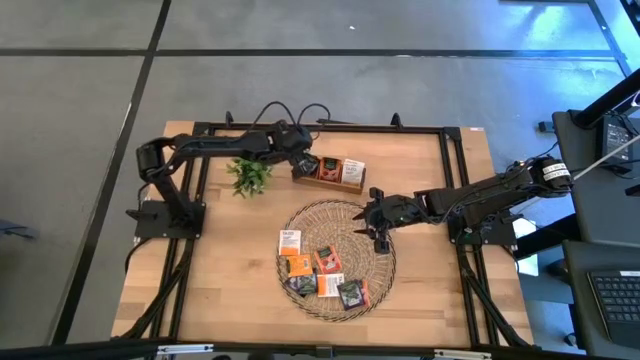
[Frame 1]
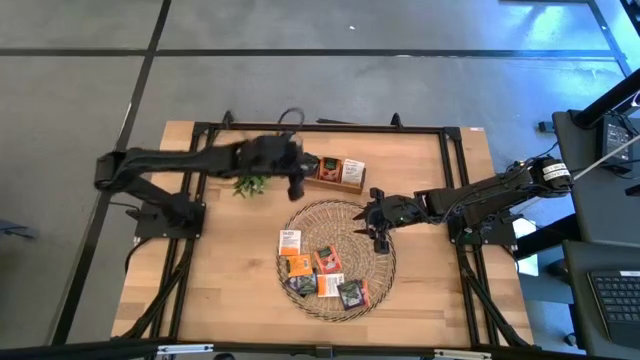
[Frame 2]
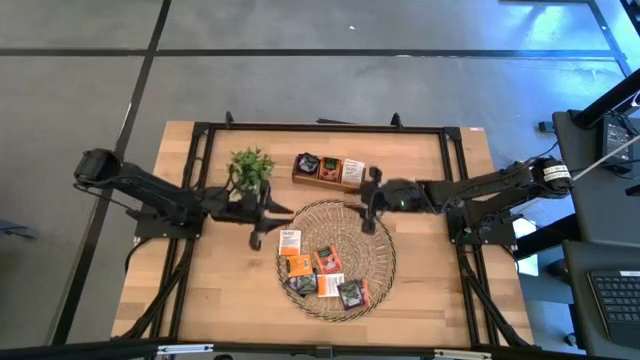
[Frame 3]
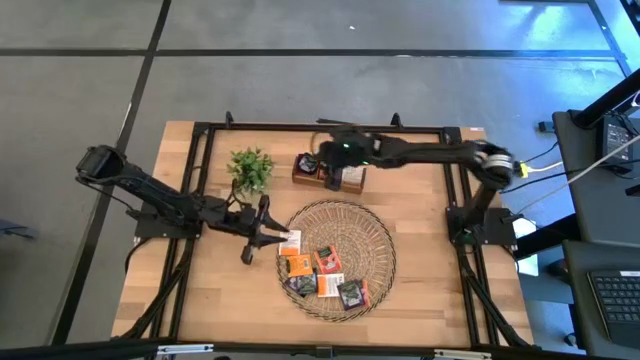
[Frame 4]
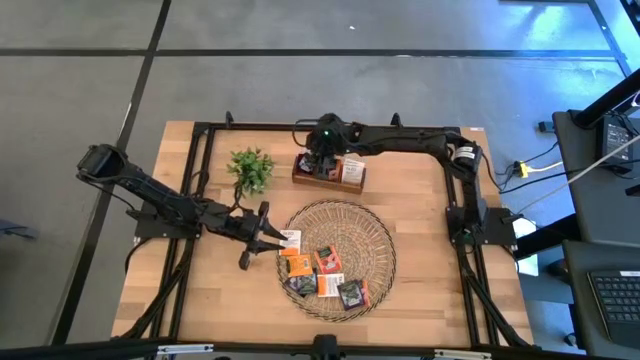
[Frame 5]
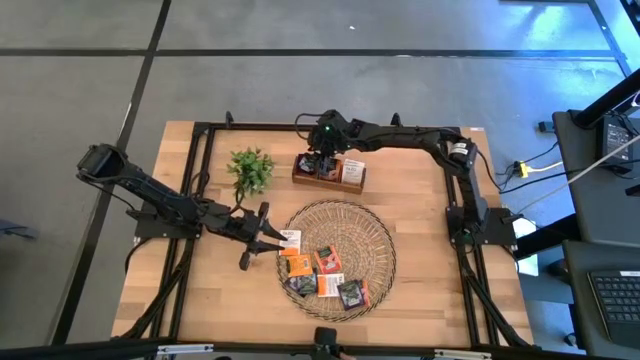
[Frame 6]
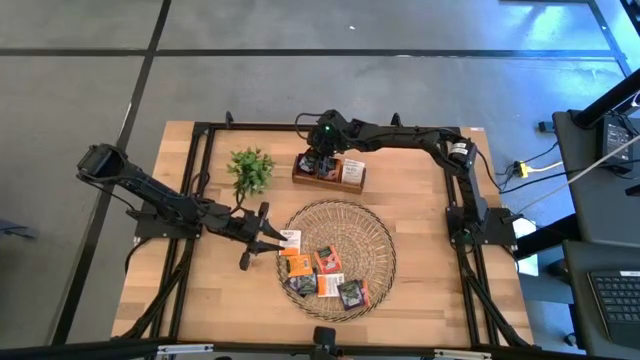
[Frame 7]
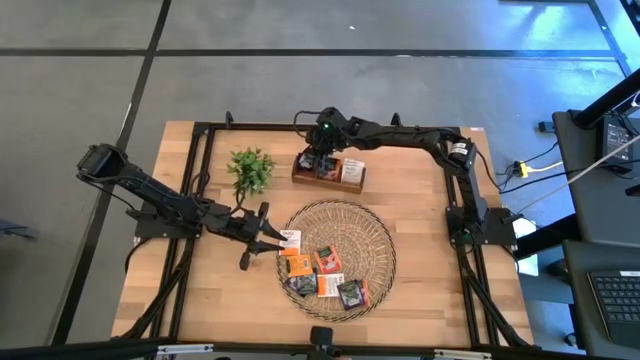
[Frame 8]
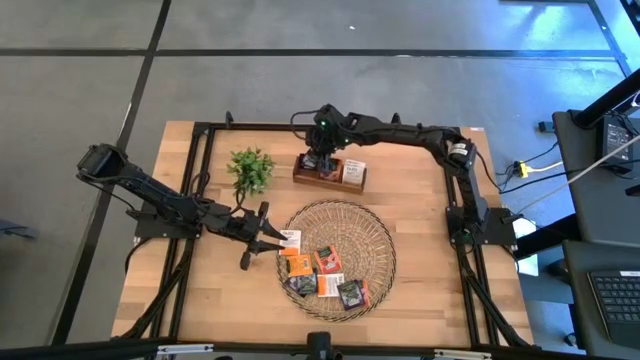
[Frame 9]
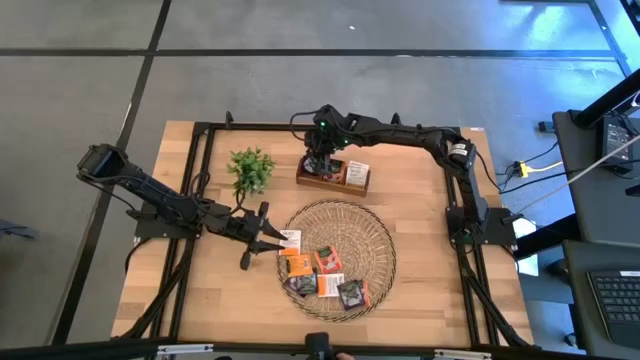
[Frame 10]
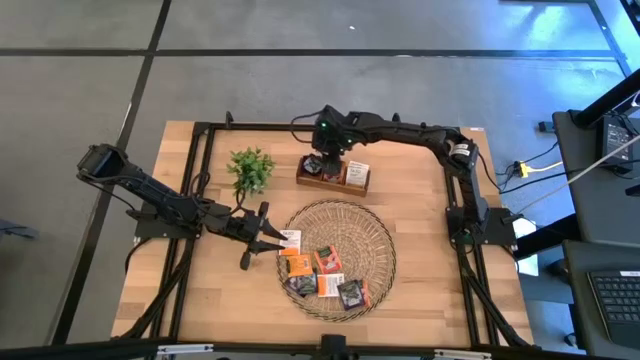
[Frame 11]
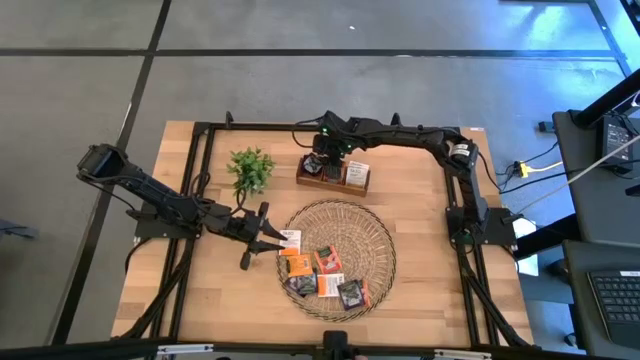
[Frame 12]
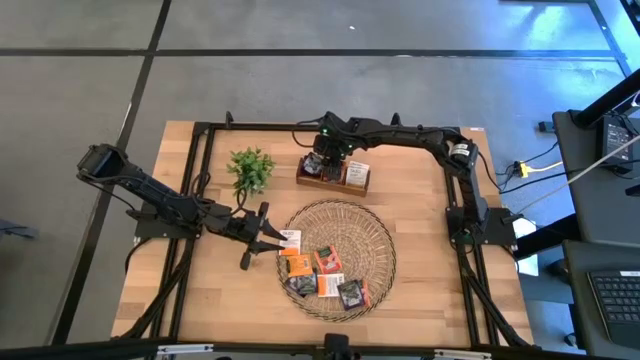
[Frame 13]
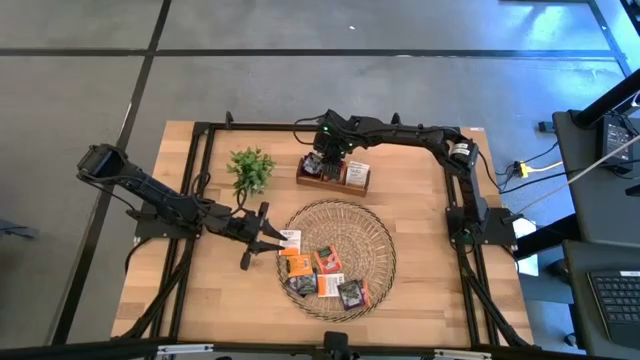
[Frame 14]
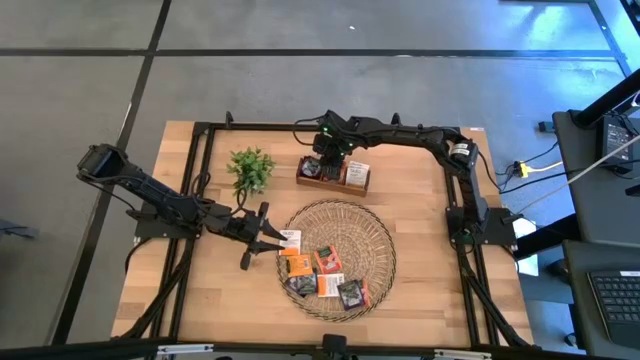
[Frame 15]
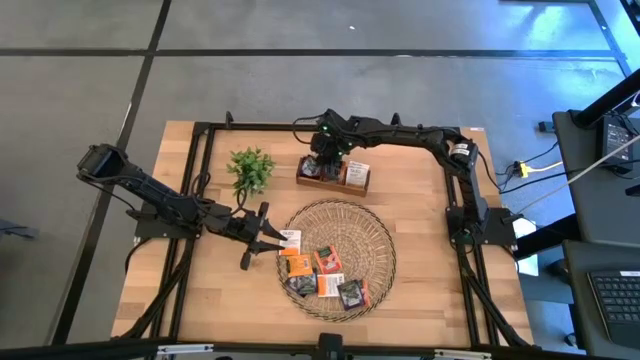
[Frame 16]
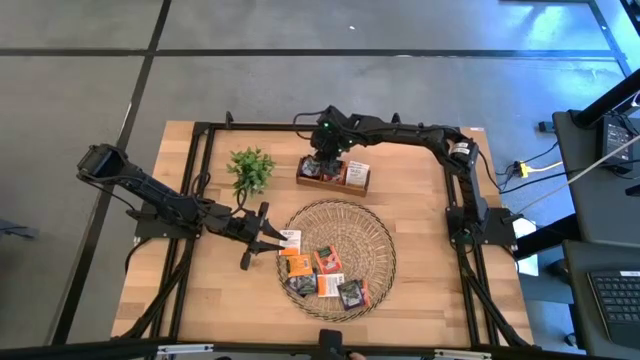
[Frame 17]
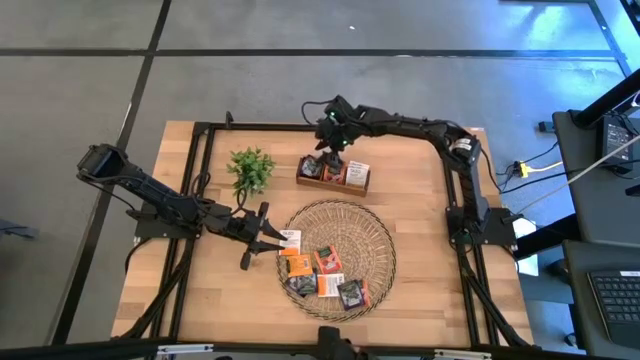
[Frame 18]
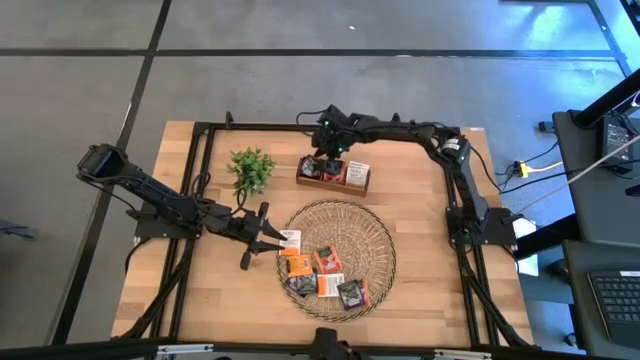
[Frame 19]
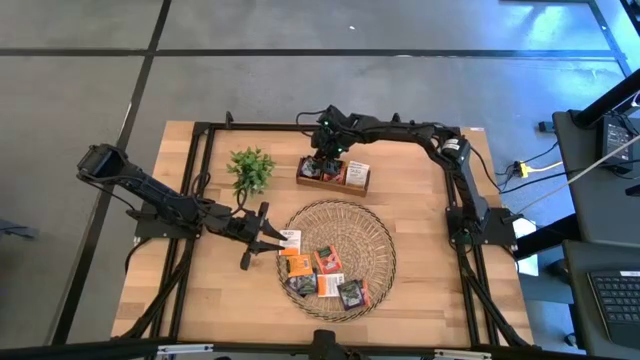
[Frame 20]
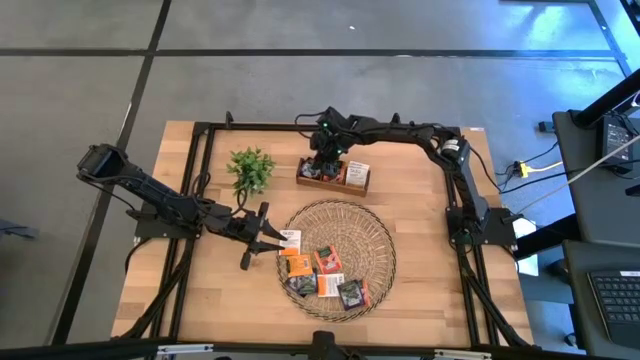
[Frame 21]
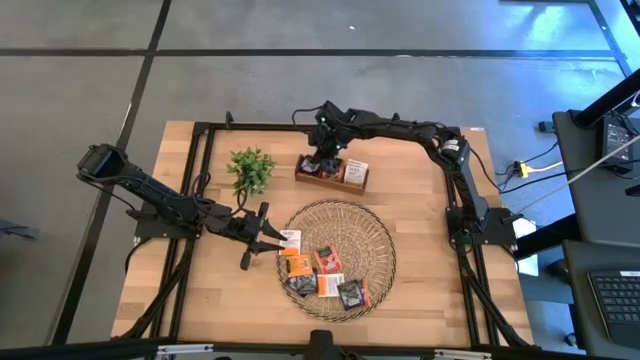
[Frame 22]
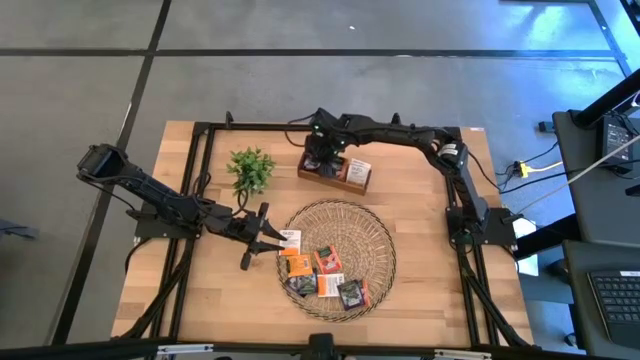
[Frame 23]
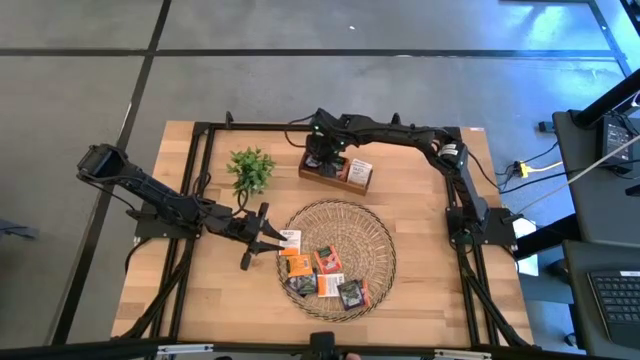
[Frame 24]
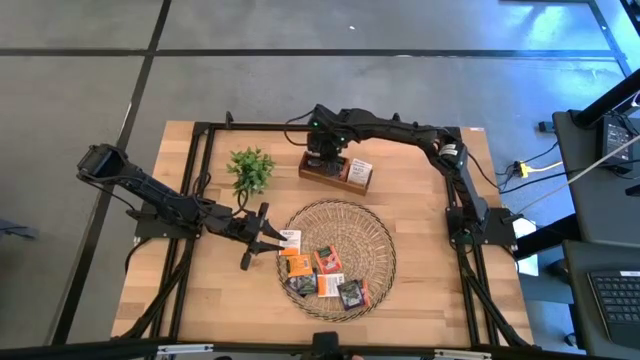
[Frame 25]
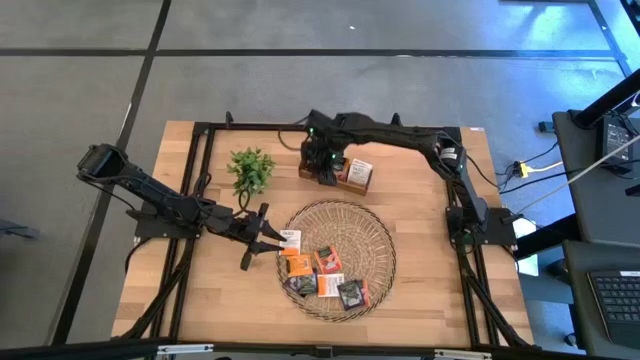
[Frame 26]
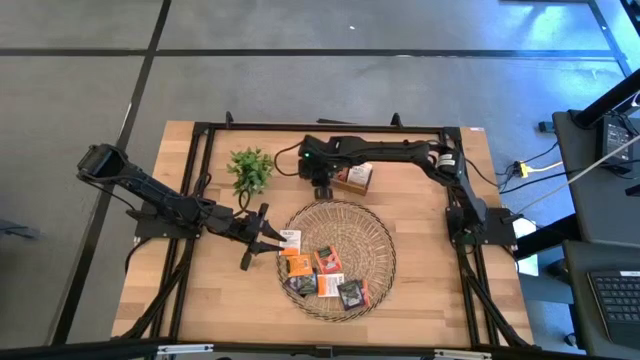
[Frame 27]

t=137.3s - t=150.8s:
Task: Pick & Place Tea
Put the black and white tea bag into the left section of the wooden organizer

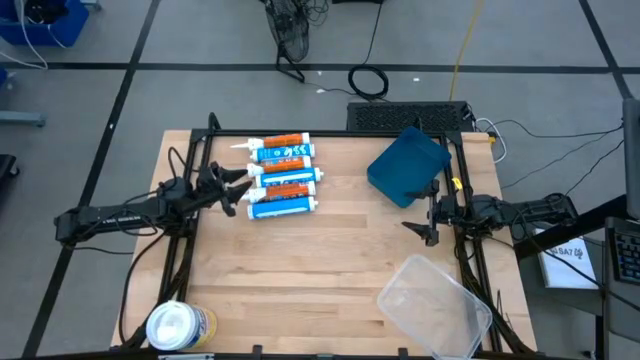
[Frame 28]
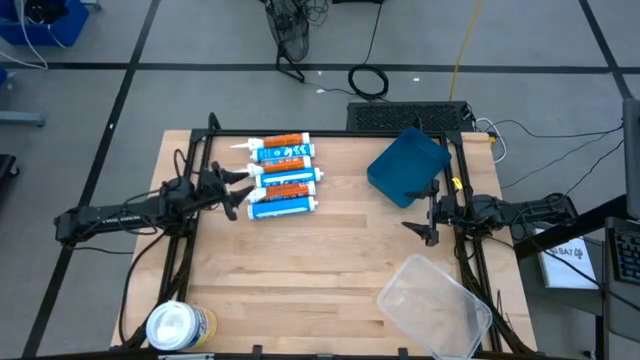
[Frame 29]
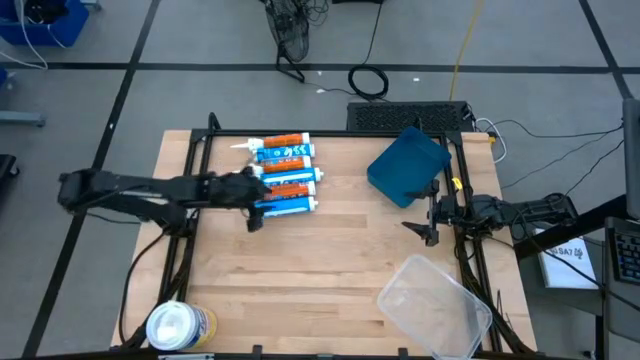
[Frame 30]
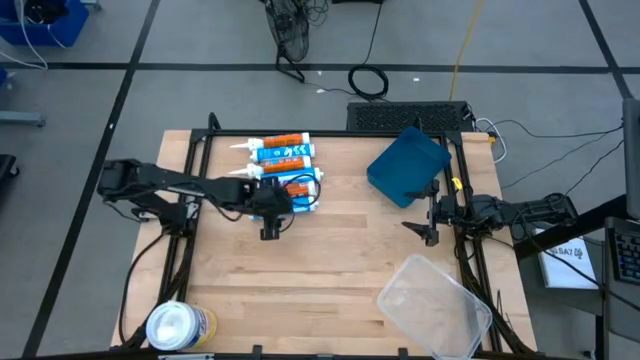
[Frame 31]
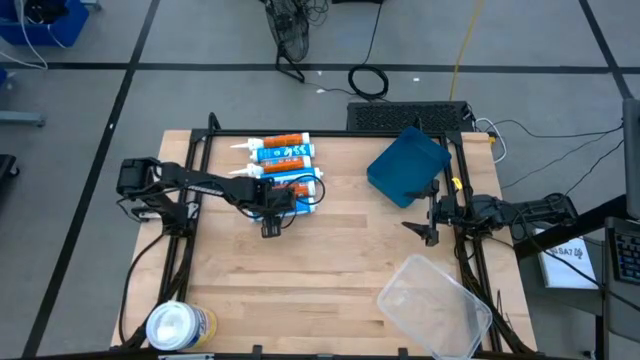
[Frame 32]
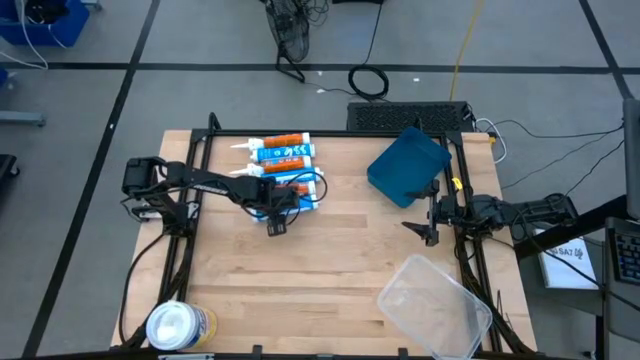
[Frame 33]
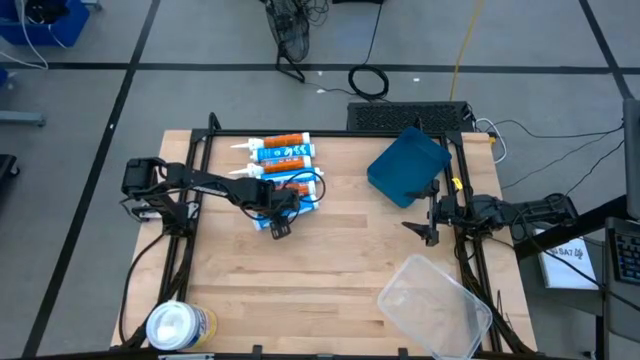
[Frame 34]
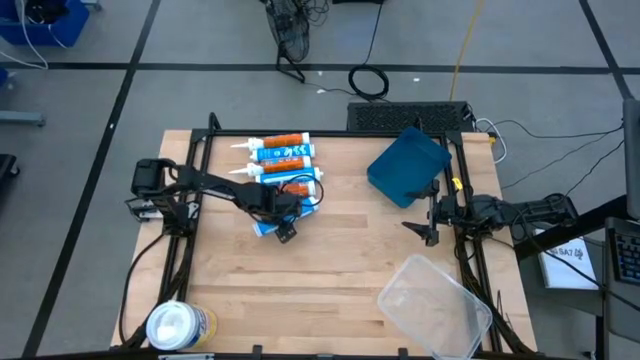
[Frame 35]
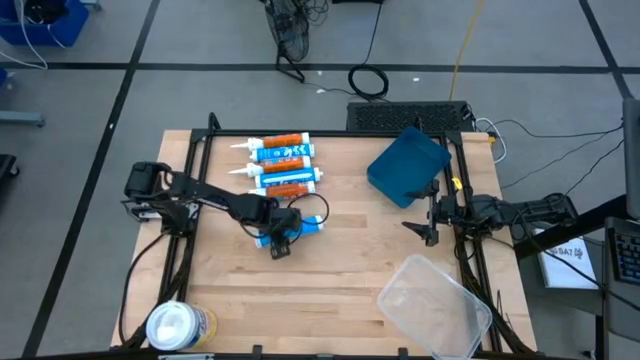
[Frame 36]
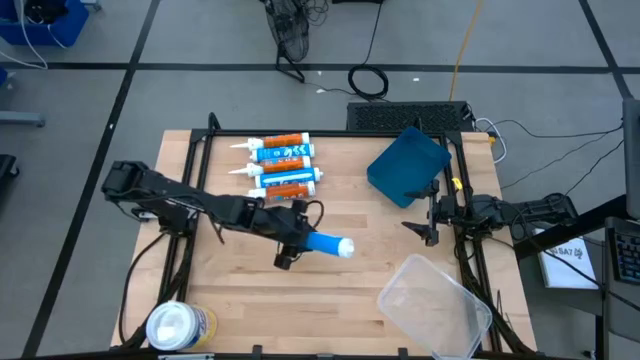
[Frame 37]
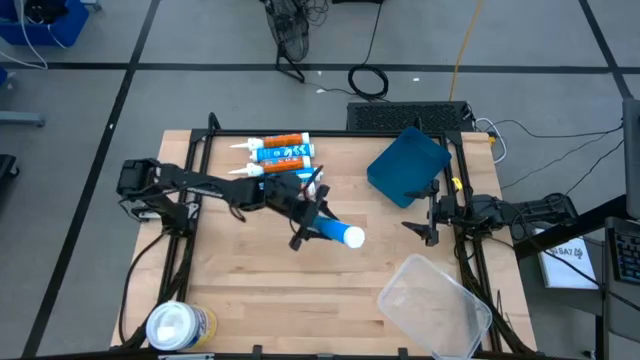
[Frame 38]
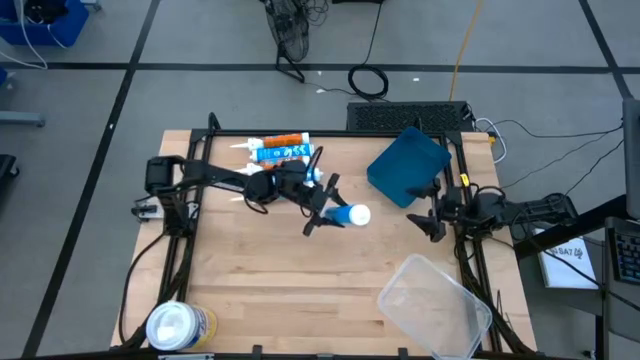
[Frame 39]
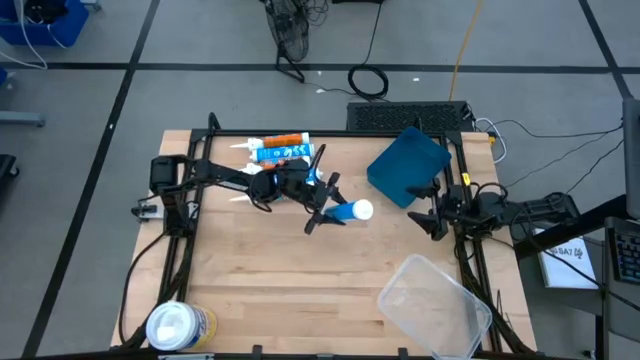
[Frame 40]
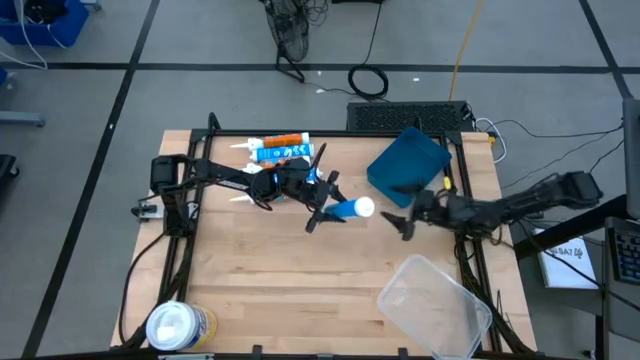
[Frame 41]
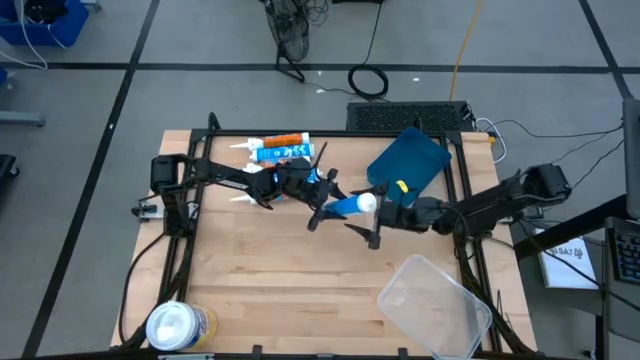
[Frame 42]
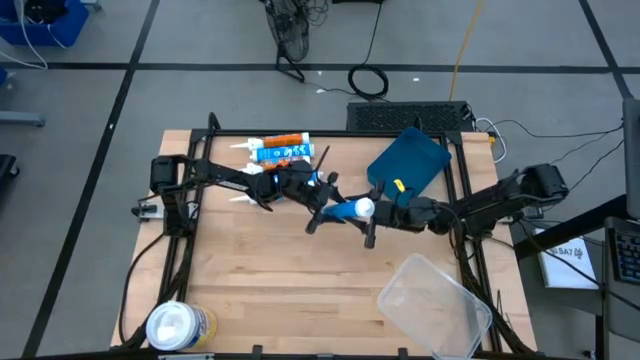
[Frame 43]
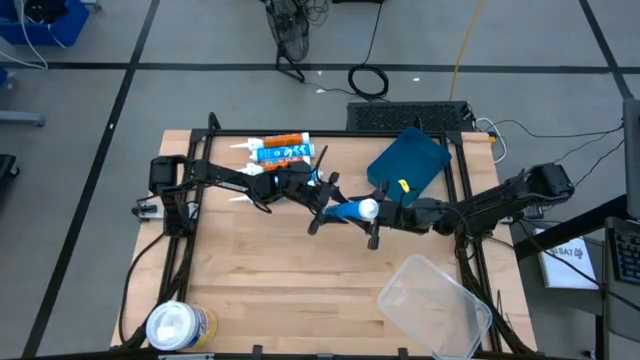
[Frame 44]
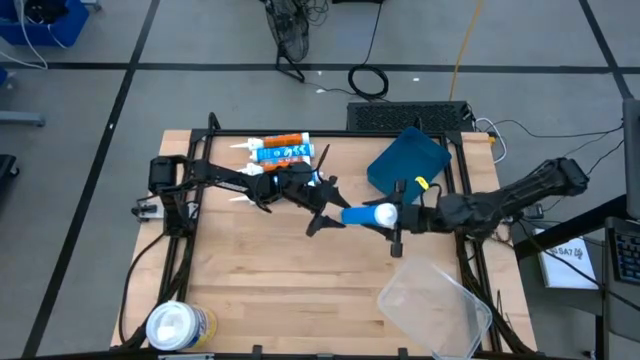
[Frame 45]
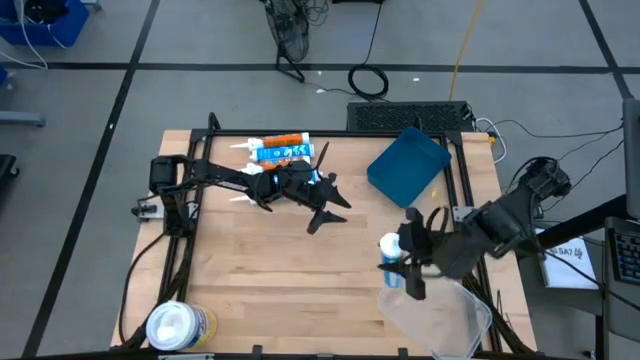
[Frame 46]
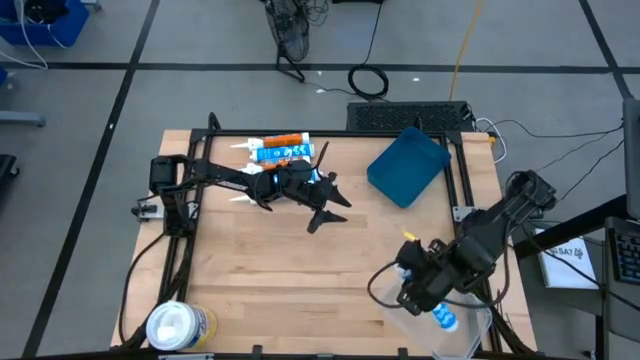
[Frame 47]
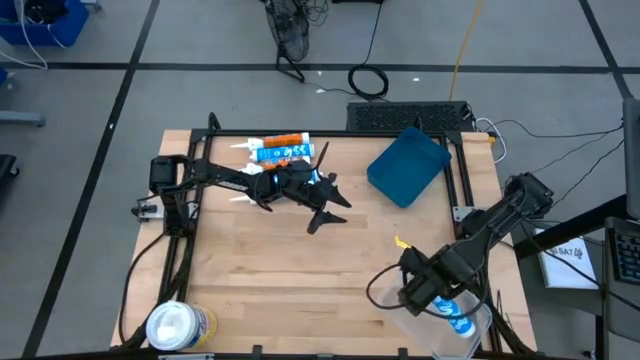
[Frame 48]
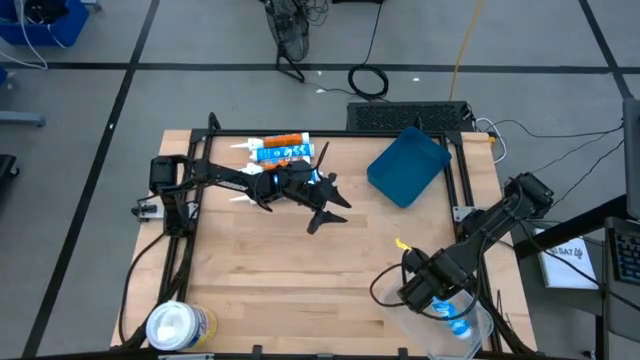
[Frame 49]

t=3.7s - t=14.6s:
Task: Pick & place silicon tubes, Sealant and Lysol wipes
Put the bottom blue sealant into the transparent bin
